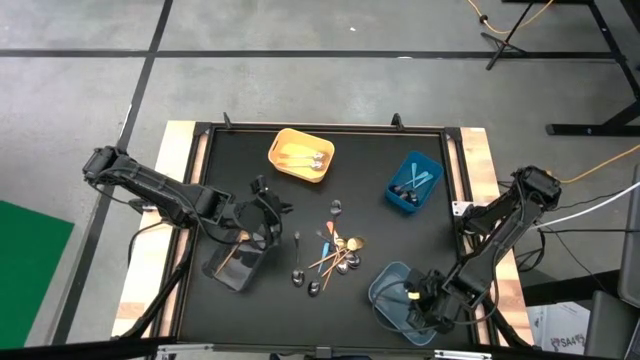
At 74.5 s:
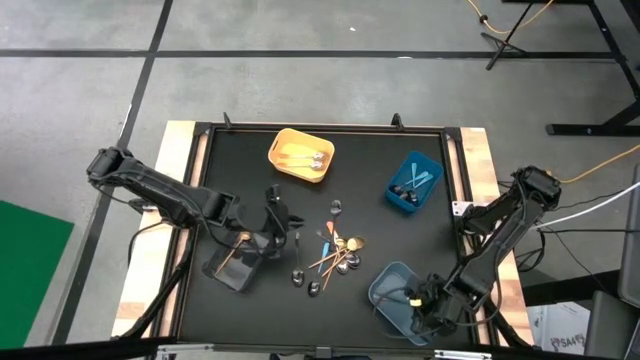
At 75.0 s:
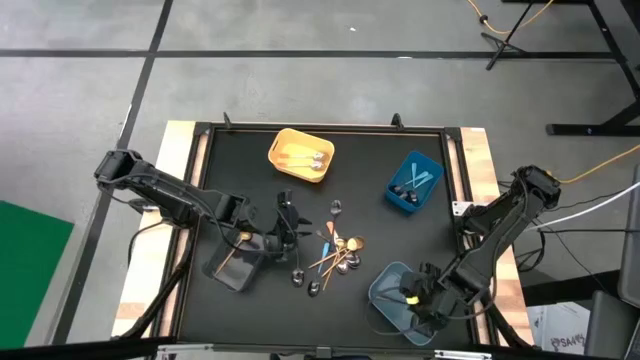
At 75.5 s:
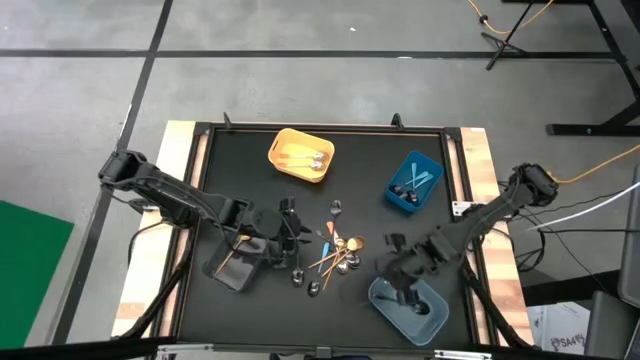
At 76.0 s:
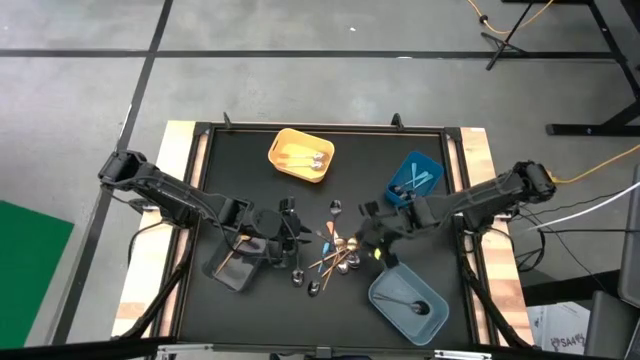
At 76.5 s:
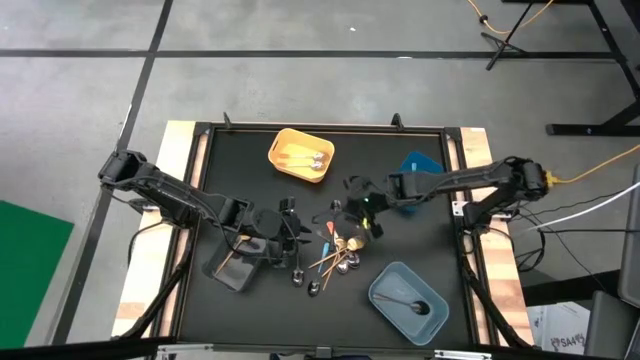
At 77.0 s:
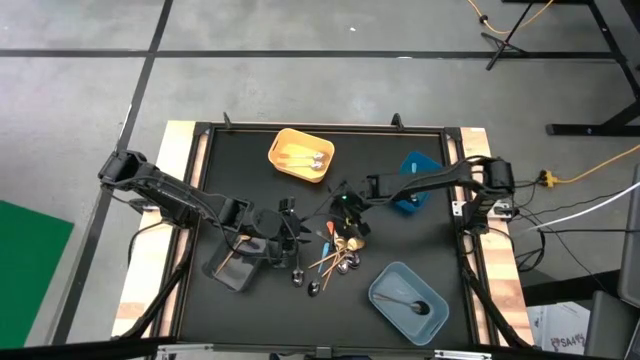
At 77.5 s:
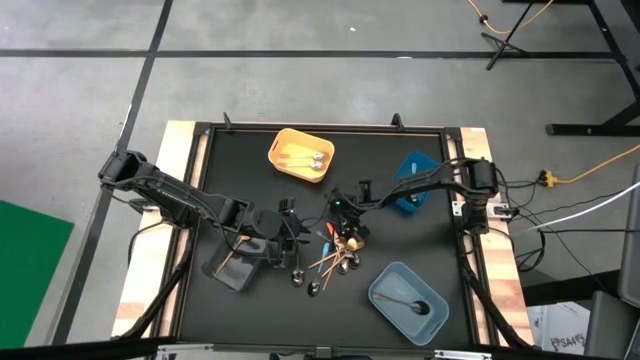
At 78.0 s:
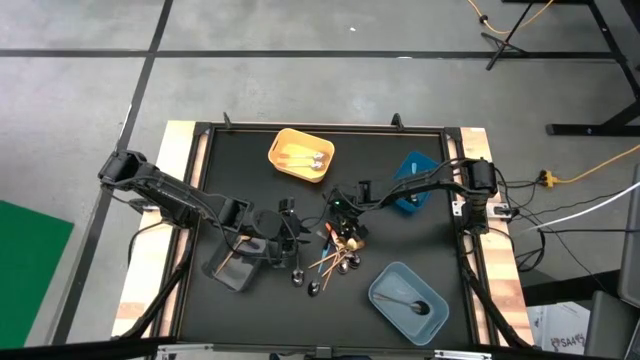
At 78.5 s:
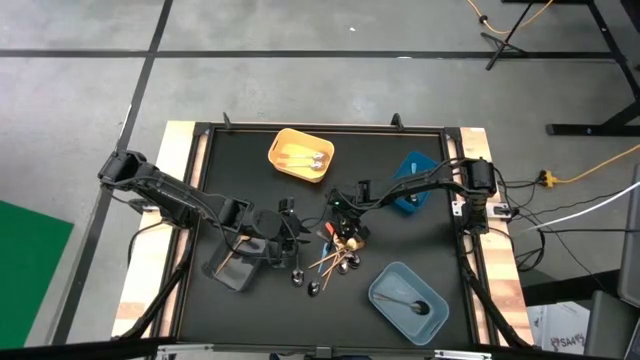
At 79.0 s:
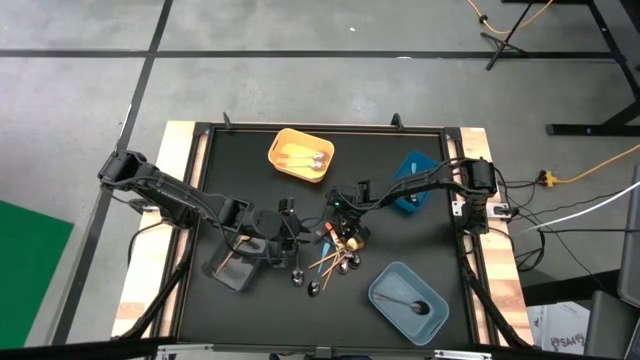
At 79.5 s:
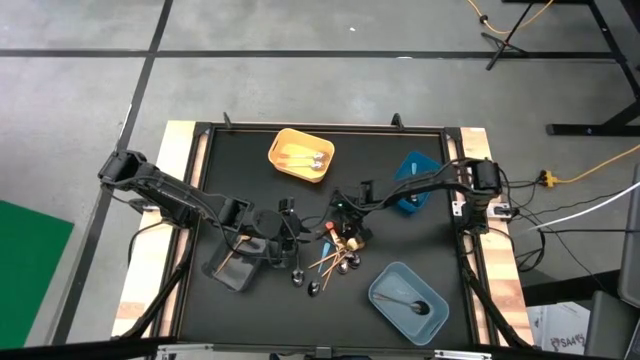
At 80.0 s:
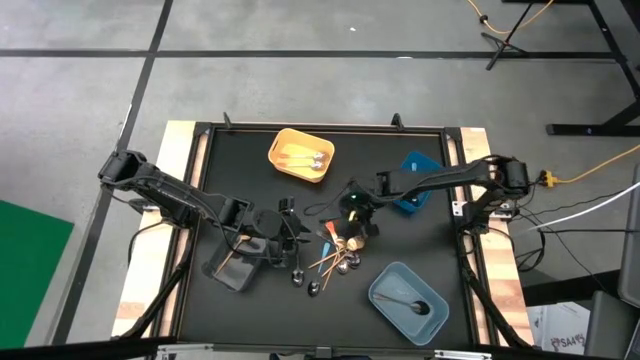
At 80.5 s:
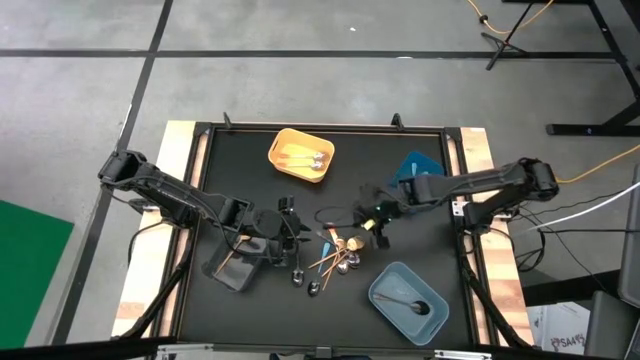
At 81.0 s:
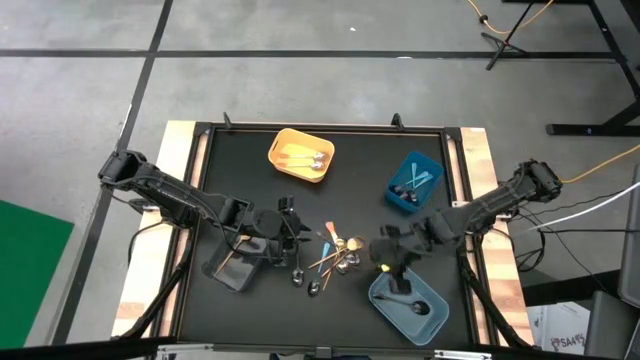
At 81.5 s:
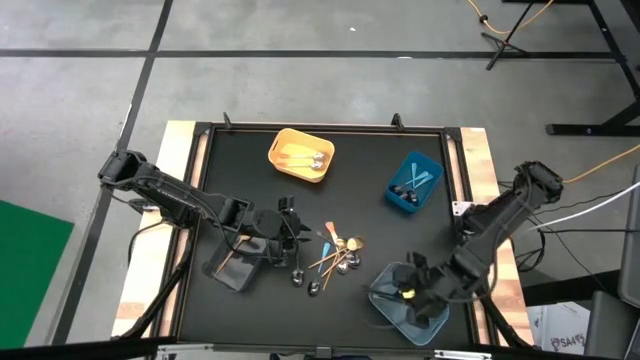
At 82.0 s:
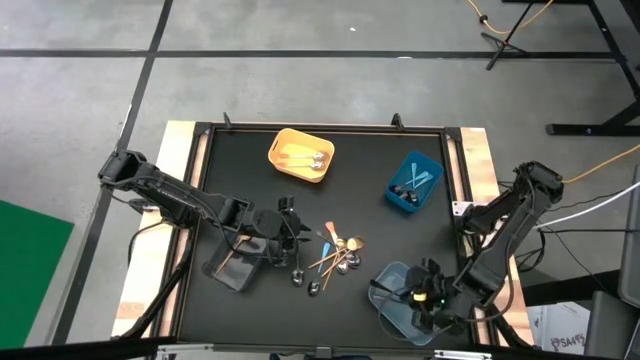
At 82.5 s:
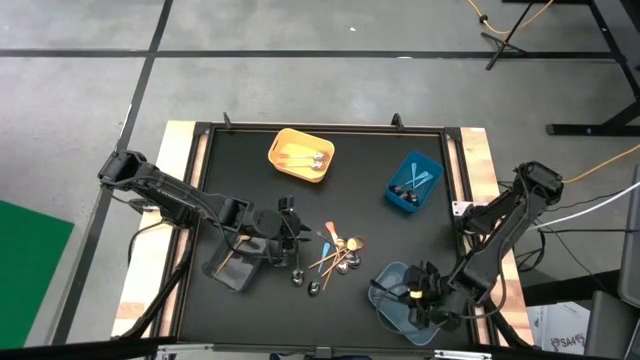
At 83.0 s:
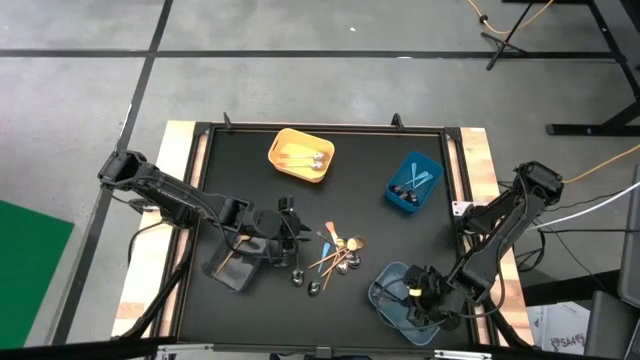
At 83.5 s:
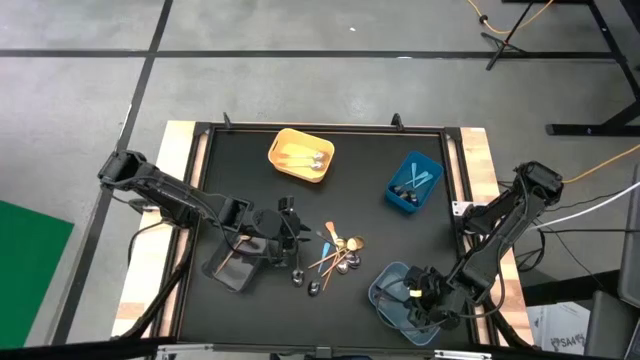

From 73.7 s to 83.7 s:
Task: Sort silverware by color (type)
Put the black spoon into the light blue bin

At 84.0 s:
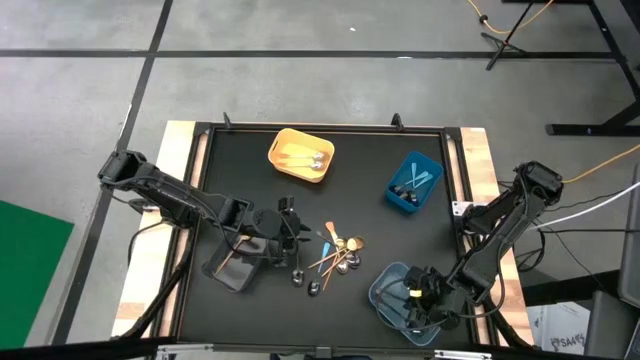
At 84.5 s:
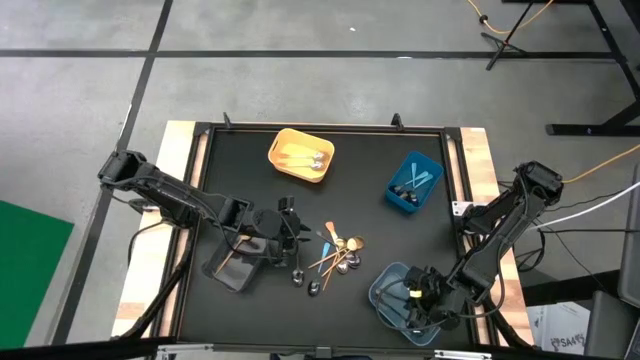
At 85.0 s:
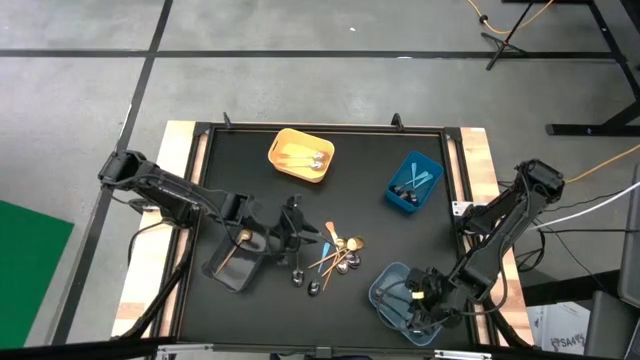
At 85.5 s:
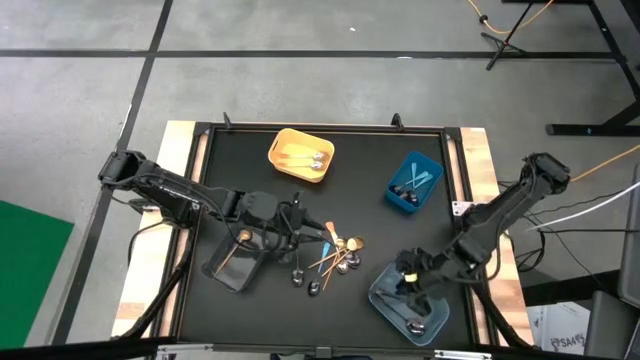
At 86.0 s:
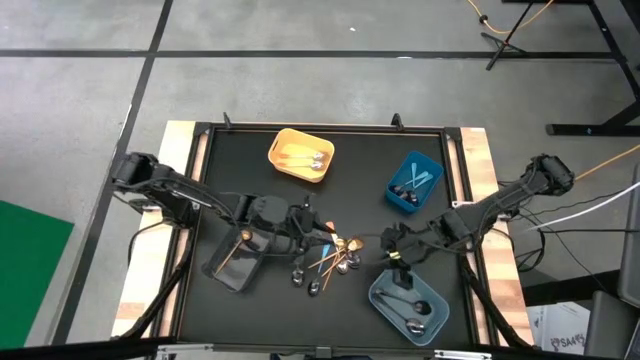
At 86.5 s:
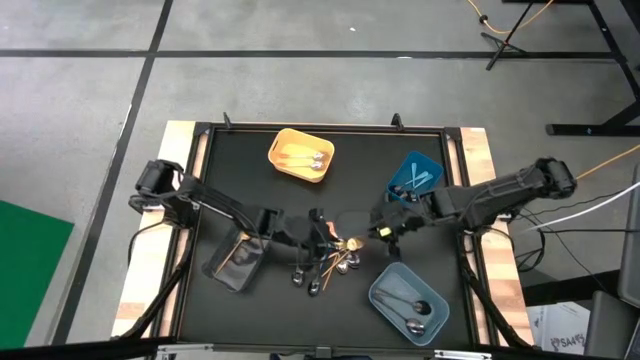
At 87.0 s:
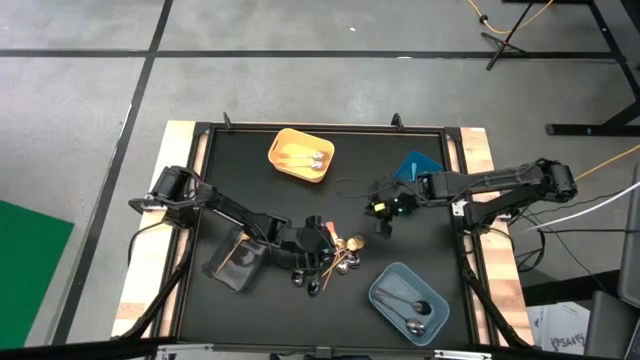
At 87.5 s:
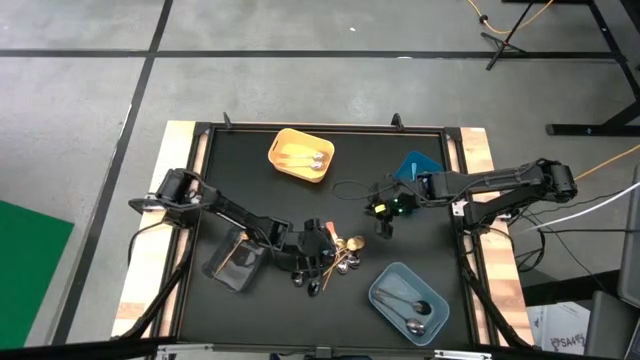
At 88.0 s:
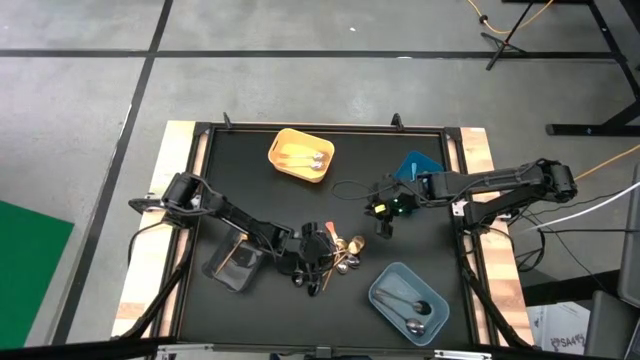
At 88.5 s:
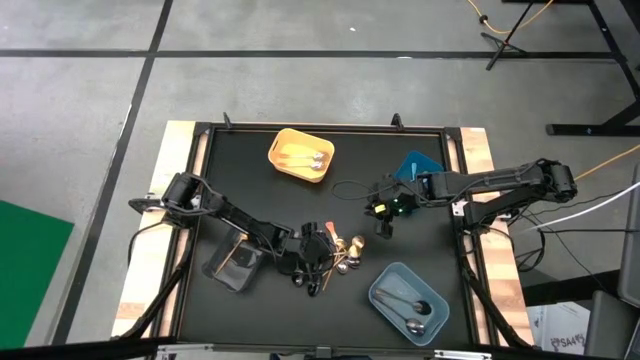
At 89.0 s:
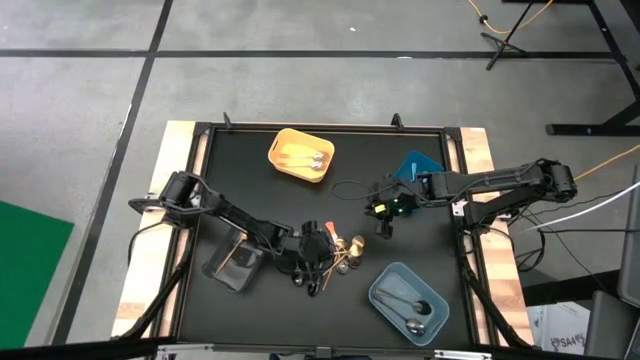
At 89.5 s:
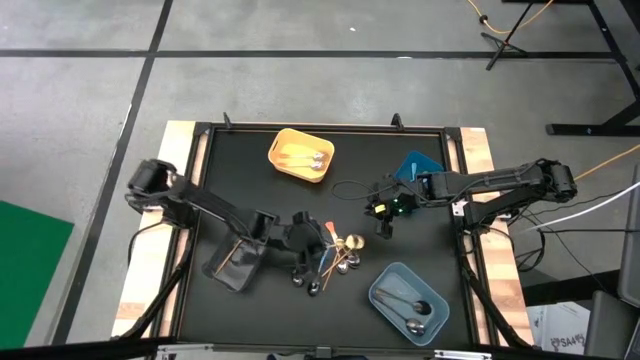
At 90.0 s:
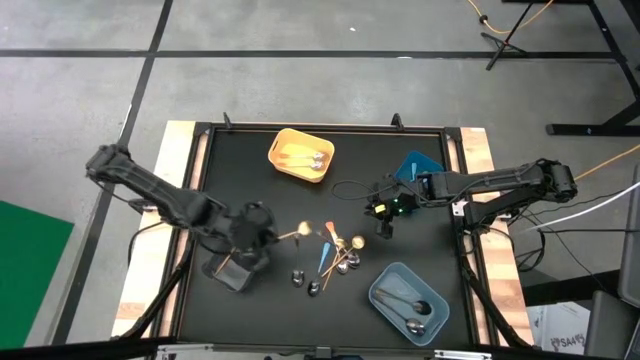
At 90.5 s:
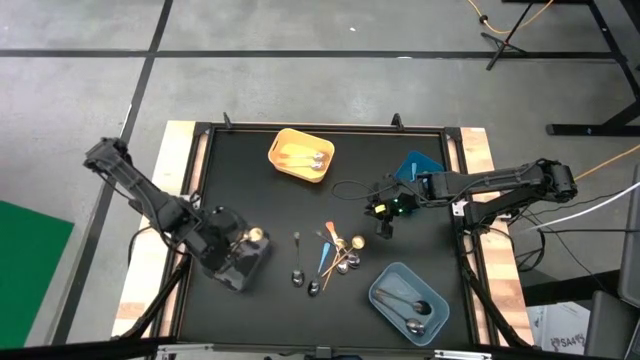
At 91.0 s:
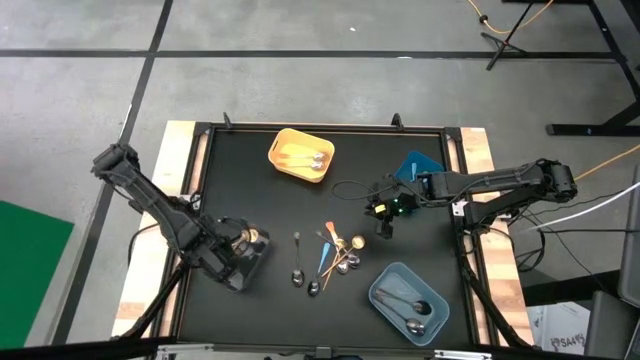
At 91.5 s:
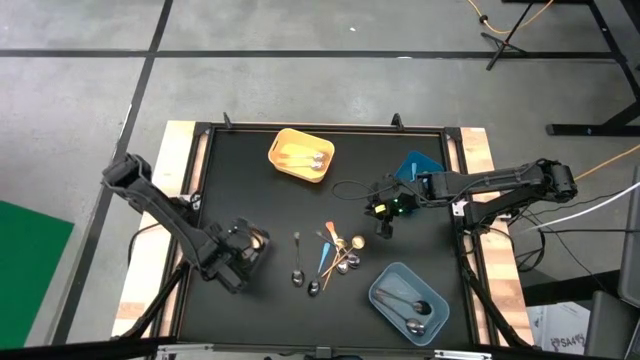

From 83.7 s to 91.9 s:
Put the gold spoon into the black bin

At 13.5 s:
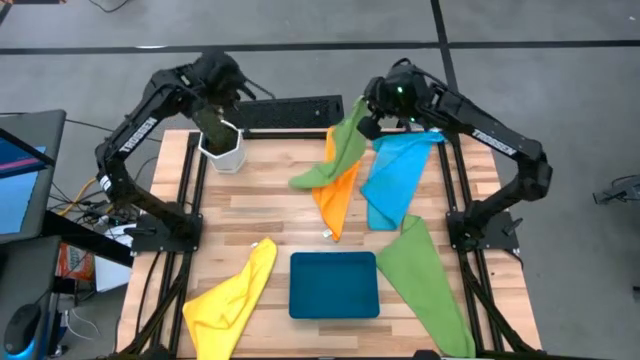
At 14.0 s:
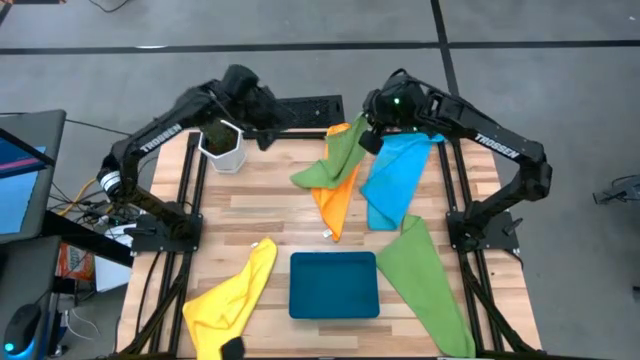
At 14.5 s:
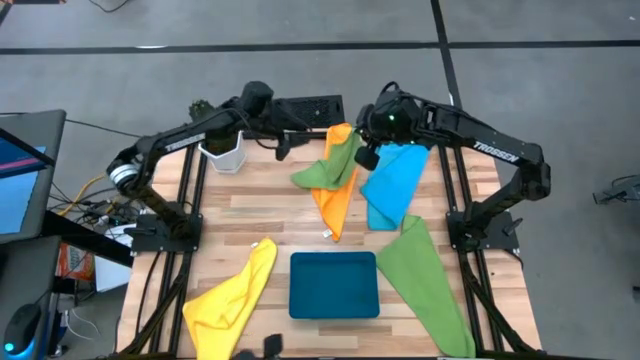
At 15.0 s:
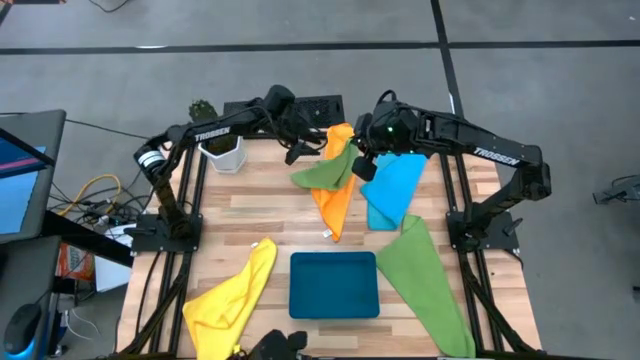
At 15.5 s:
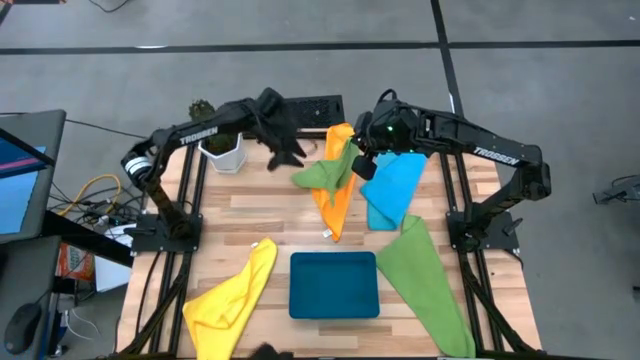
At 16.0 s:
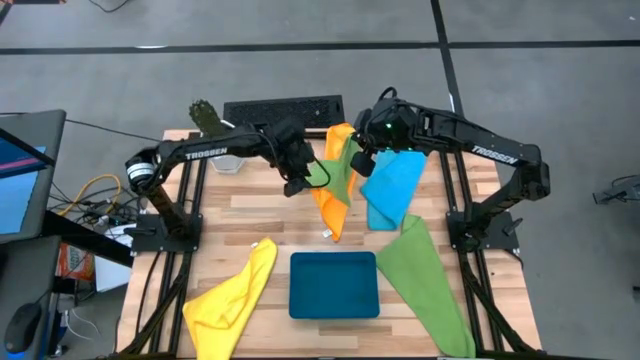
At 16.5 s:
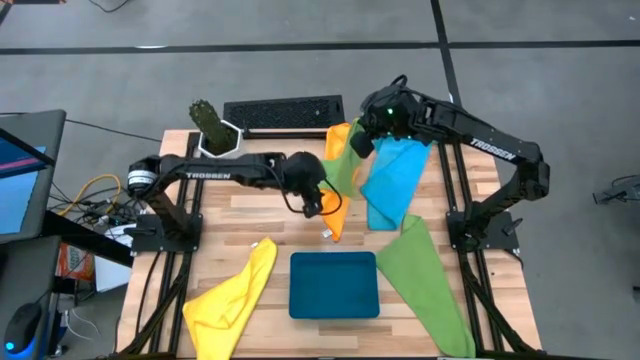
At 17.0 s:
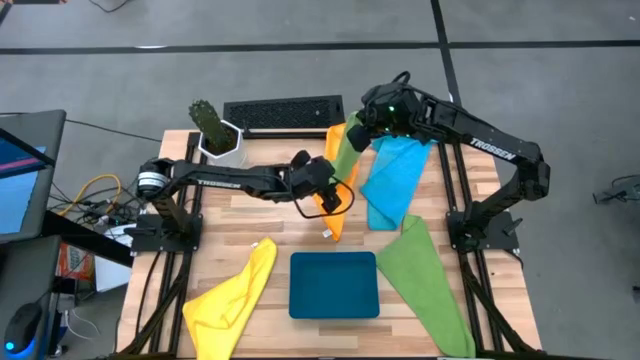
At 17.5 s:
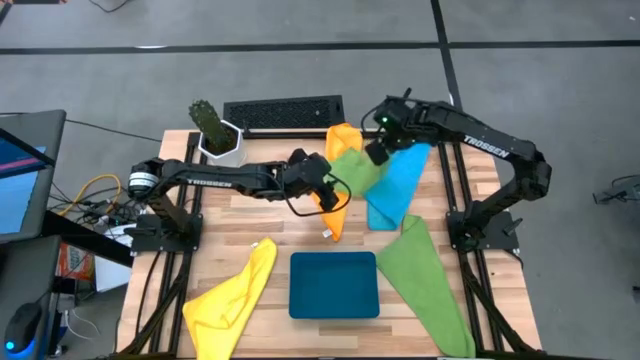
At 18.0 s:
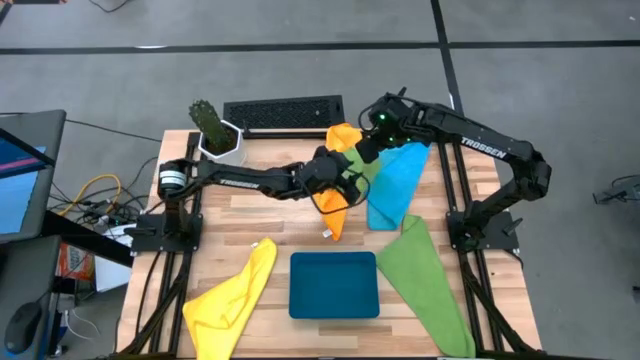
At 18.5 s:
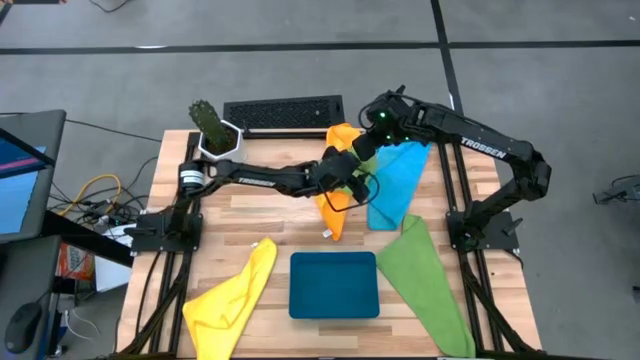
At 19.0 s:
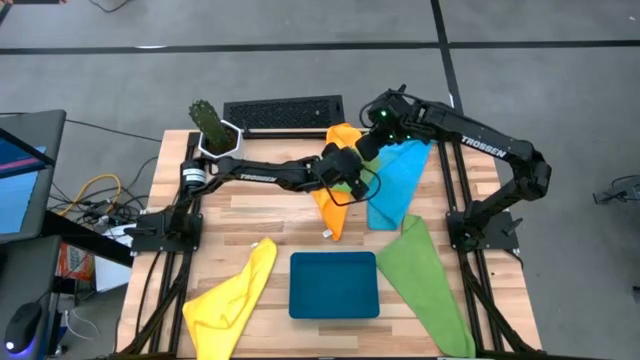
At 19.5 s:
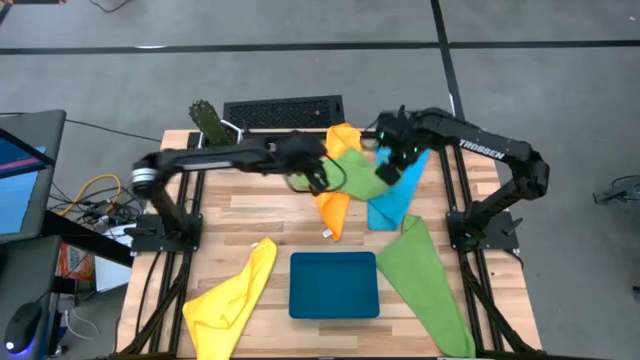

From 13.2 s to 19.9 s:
Task: Fold microfiber towels
Fold the top green microfiber towel
